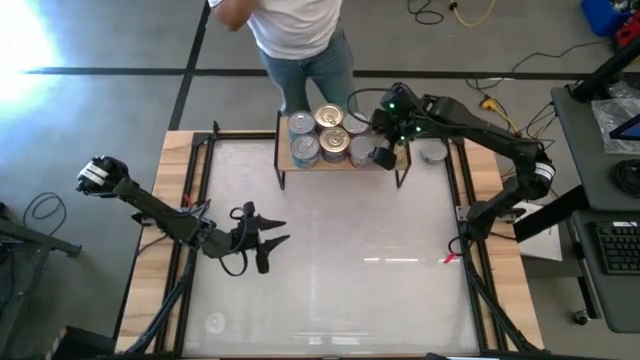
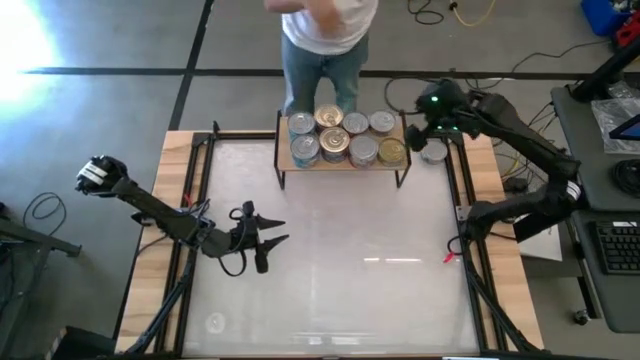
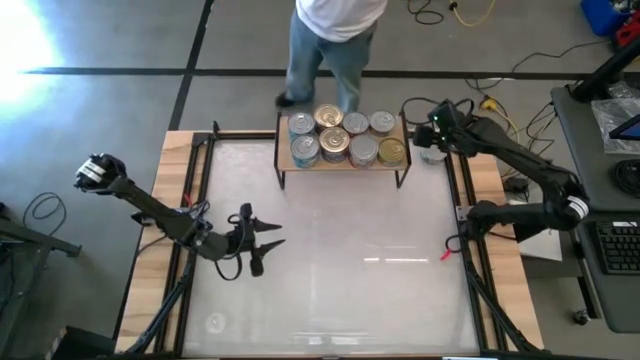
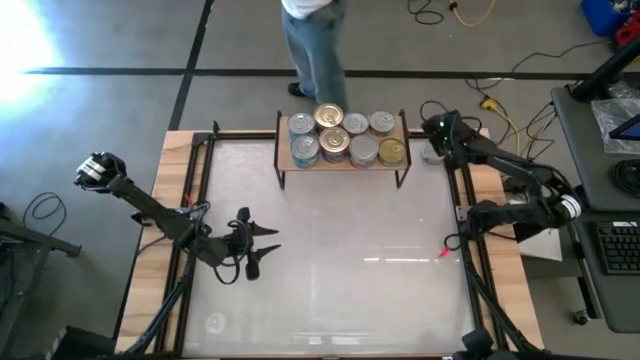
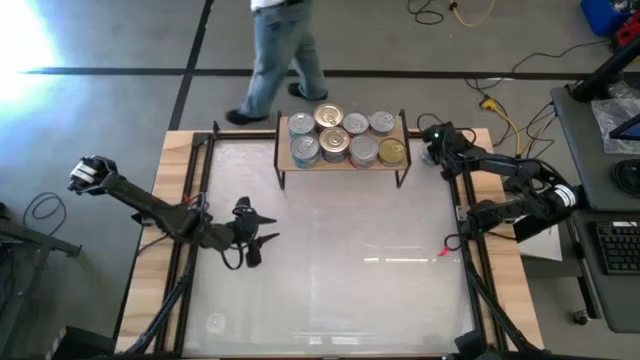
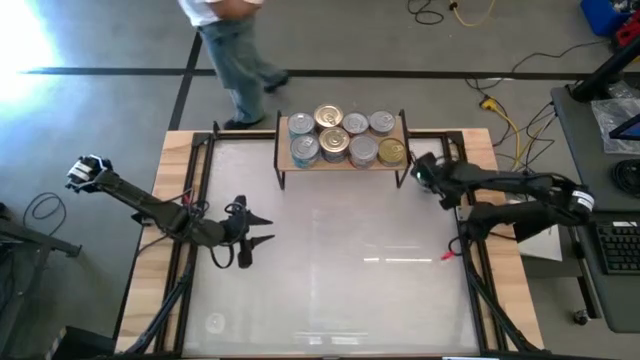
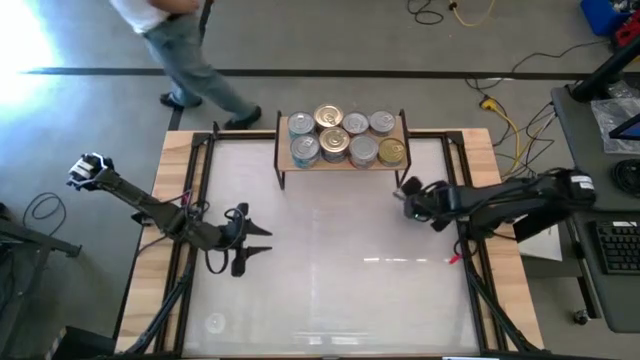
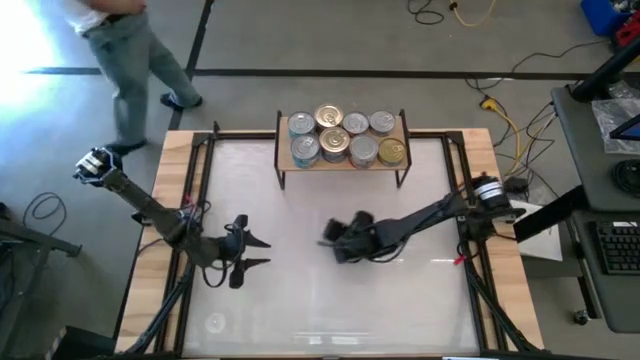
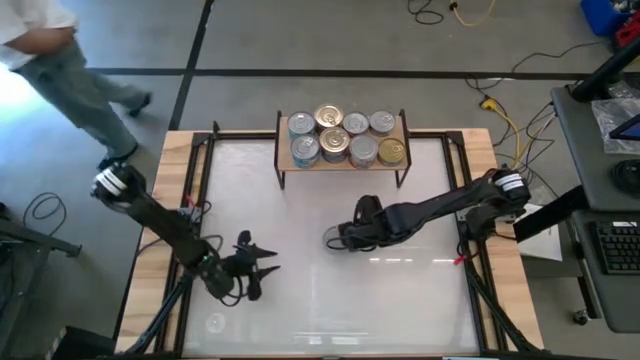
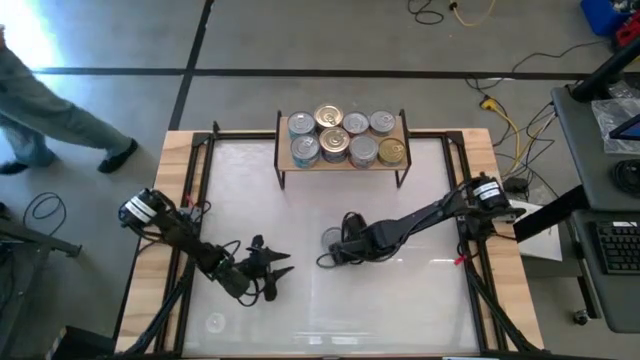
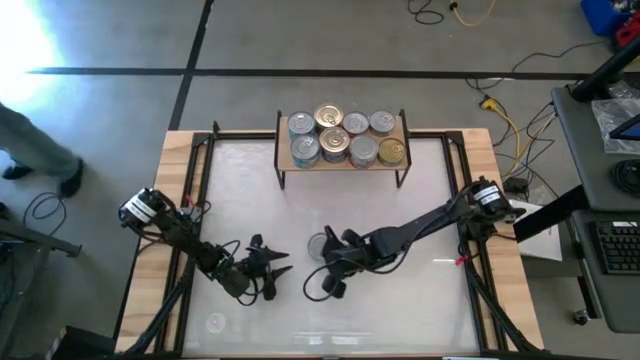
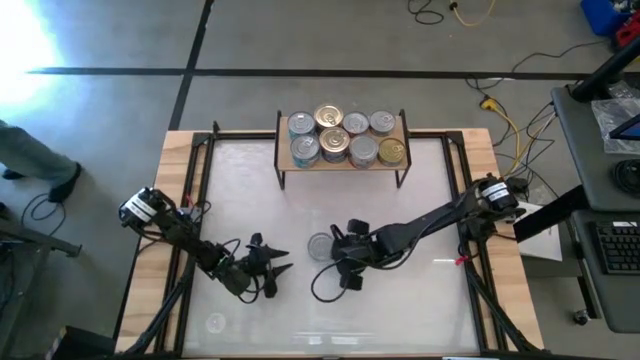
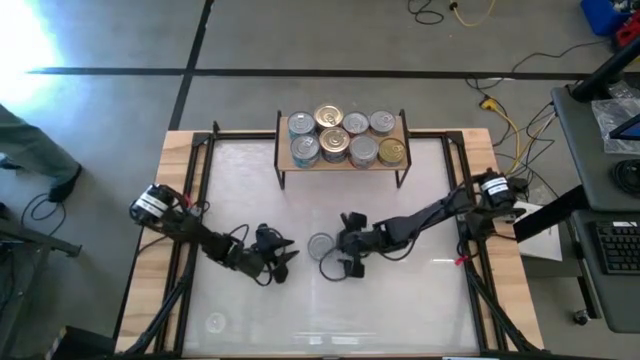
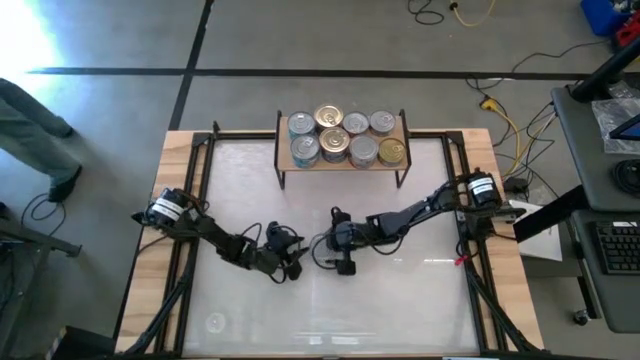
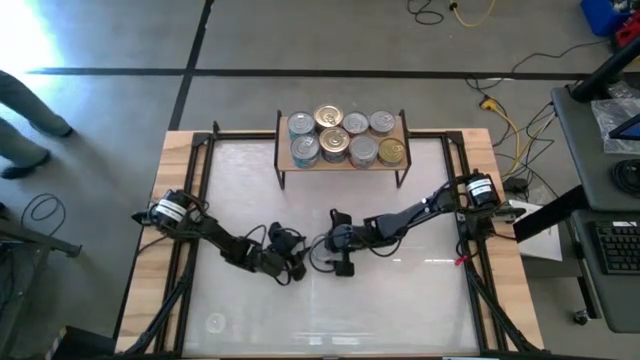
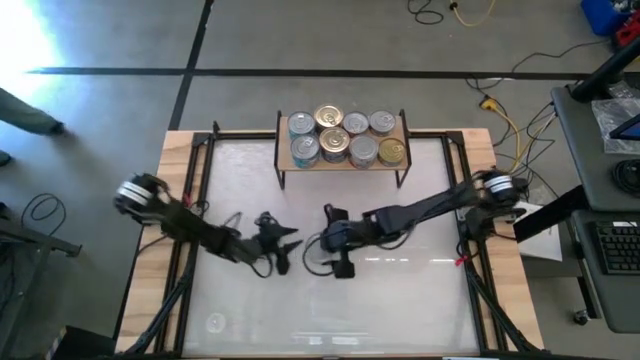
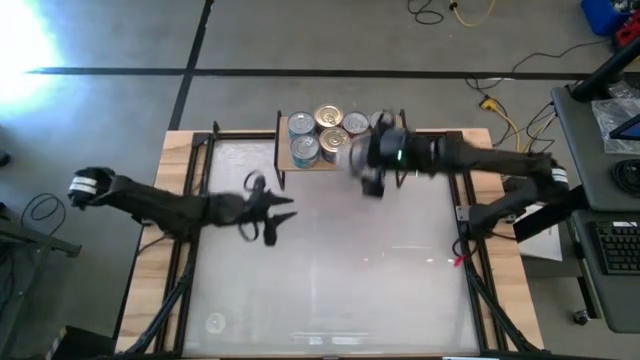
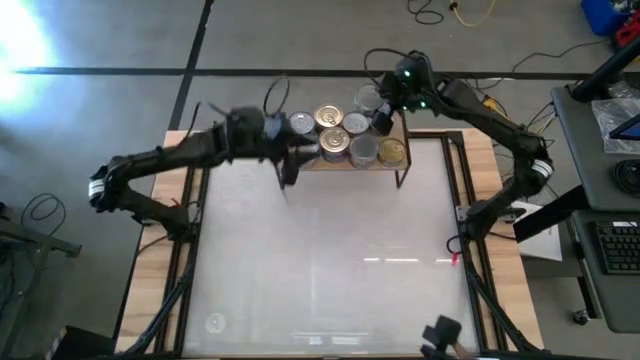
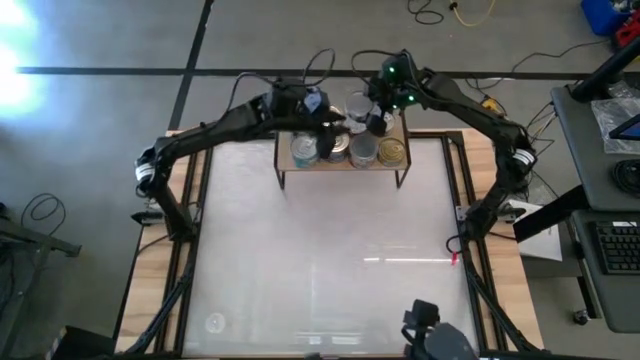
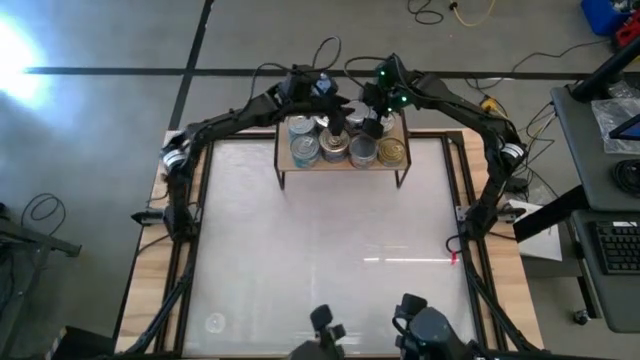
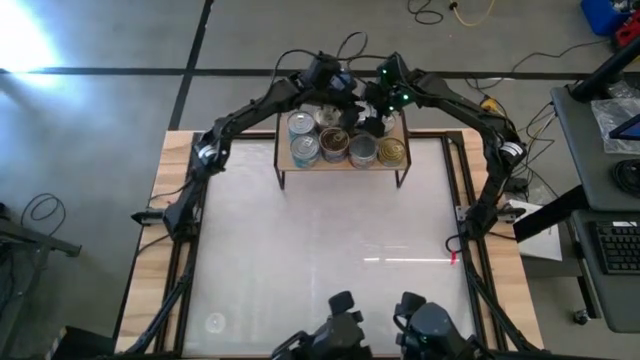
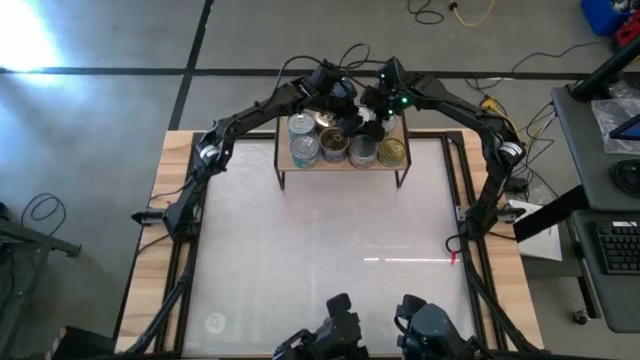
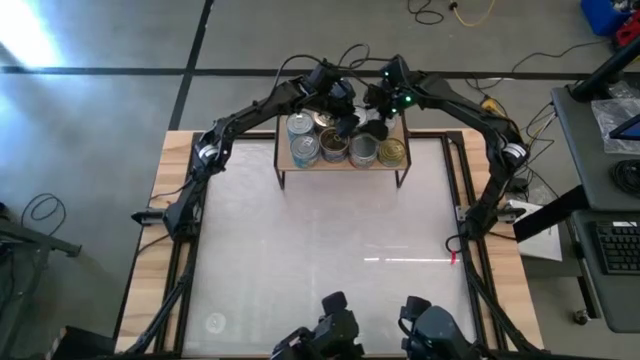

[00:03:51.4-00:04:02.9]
Task: Stack canned seafood by type on shelf
Stack the green tuna can on top of the red tuna can on the shelf

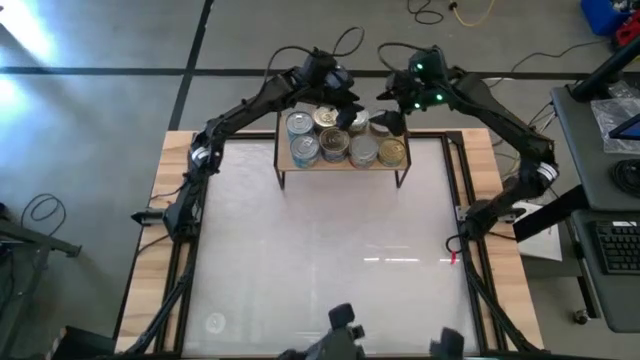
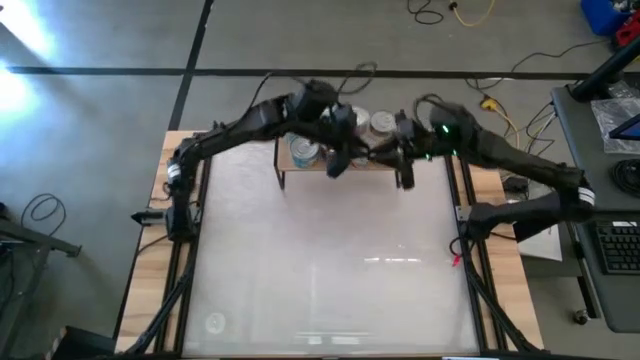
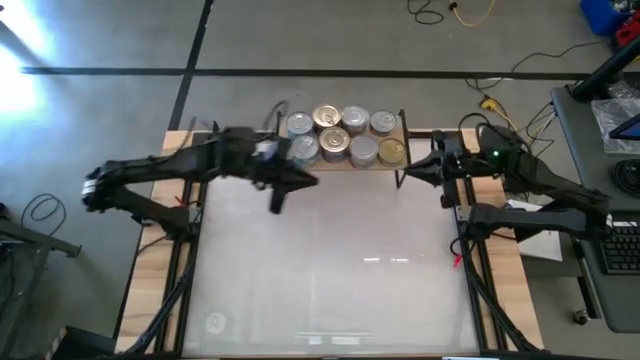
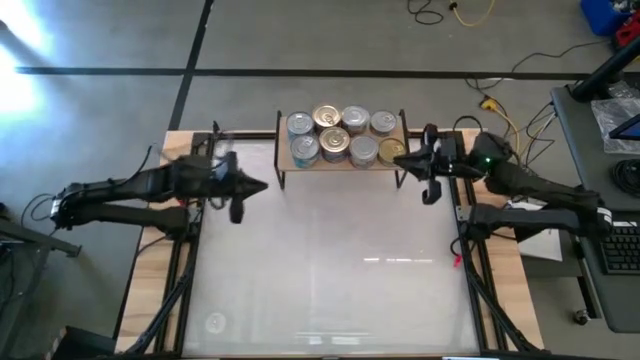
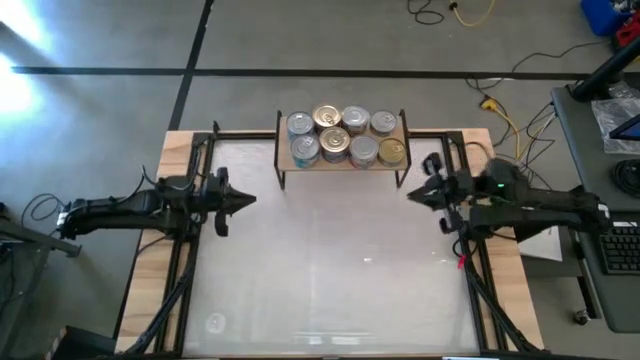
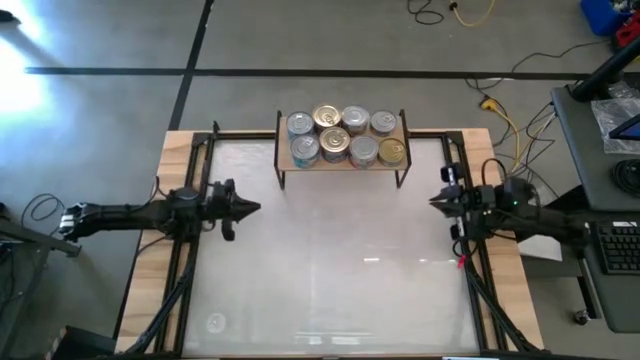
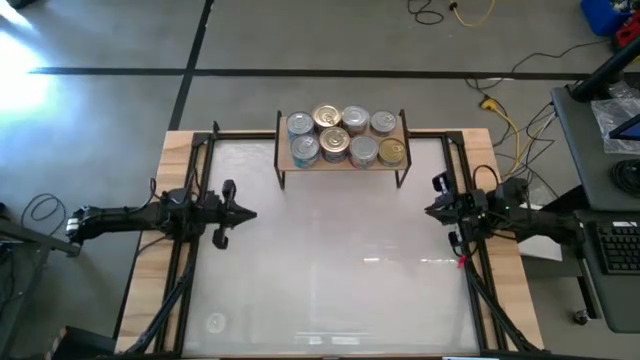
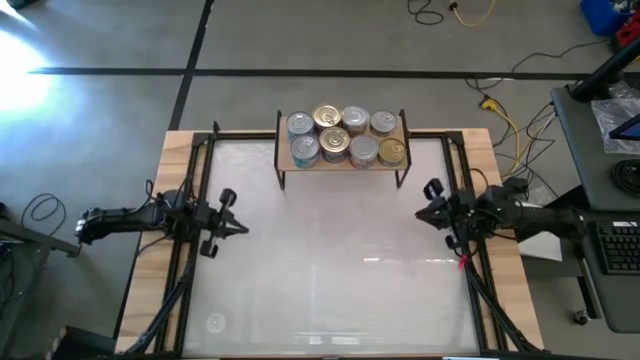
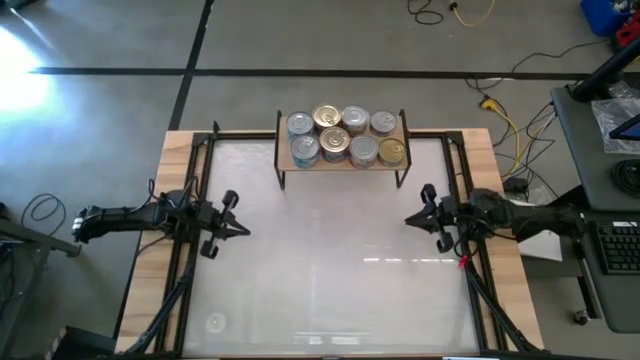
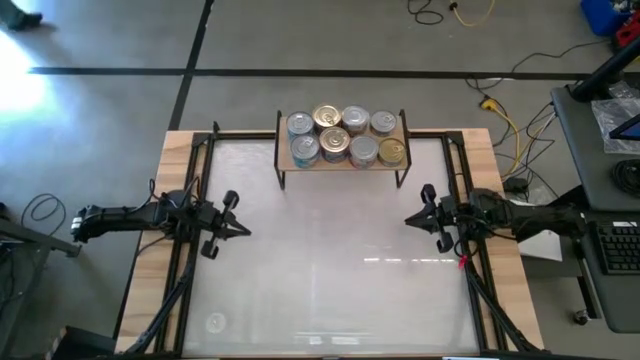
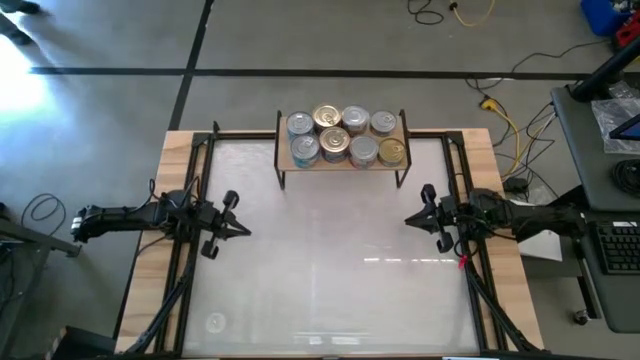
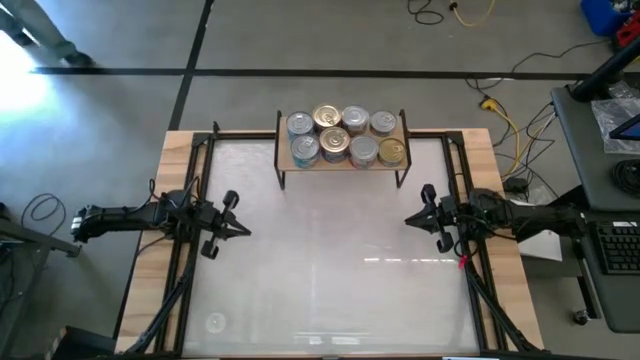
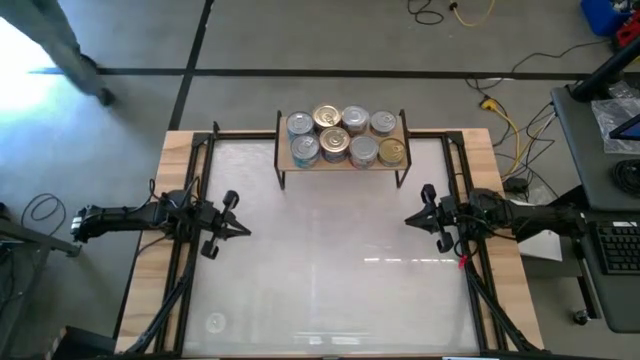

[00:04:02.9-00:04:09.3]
Return to Home Position

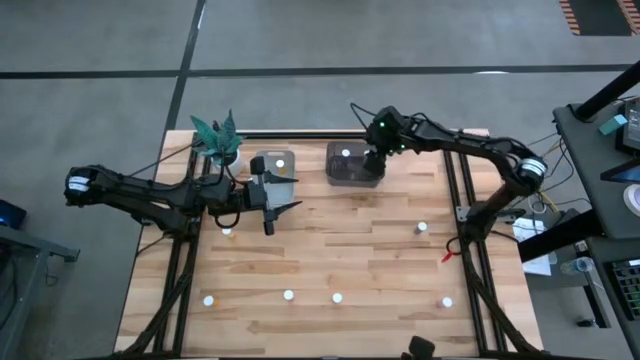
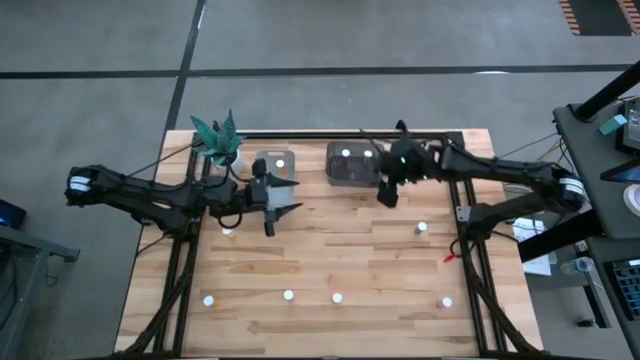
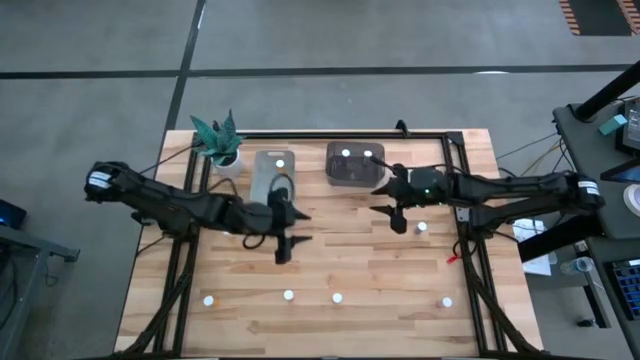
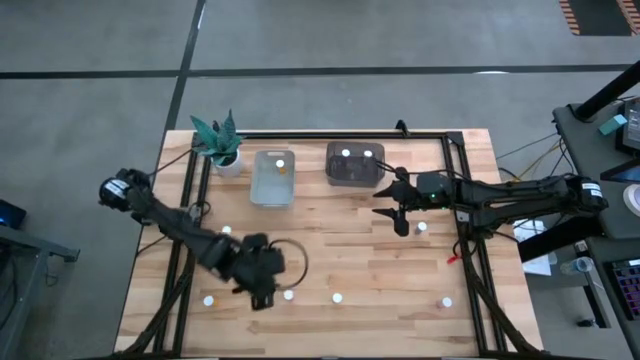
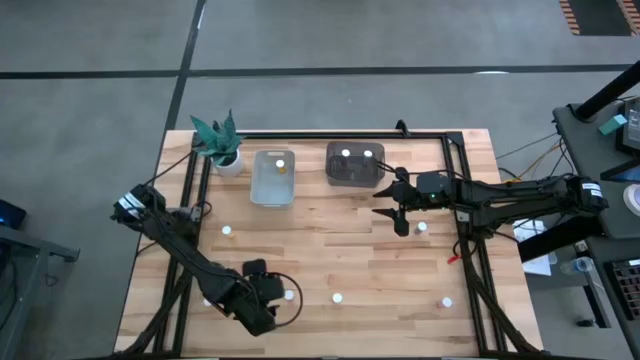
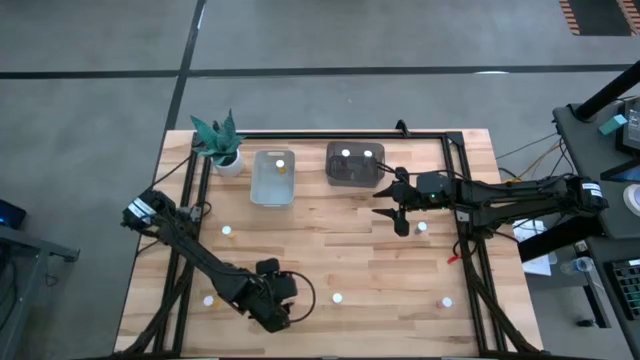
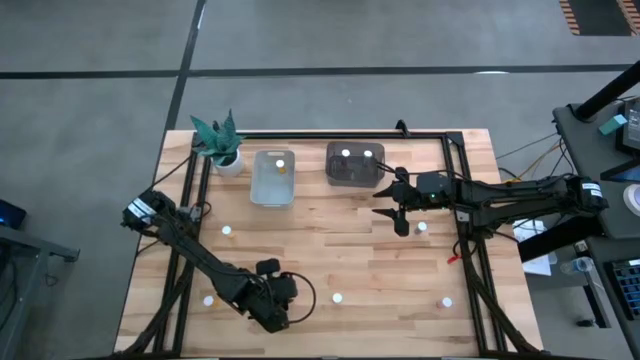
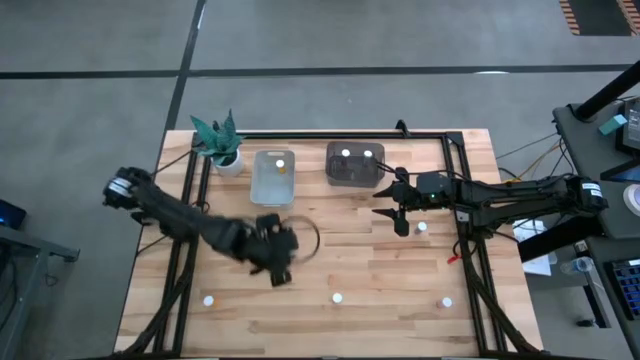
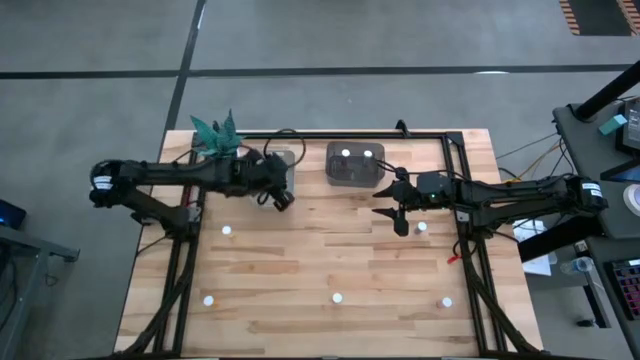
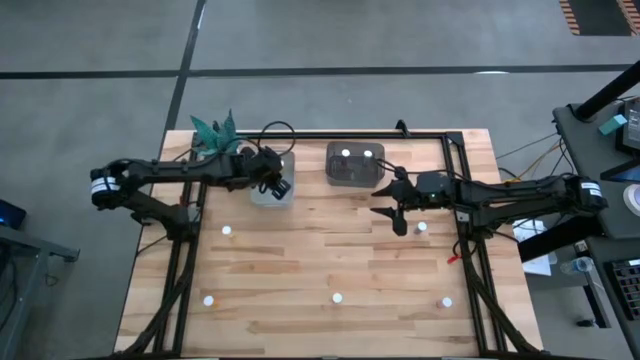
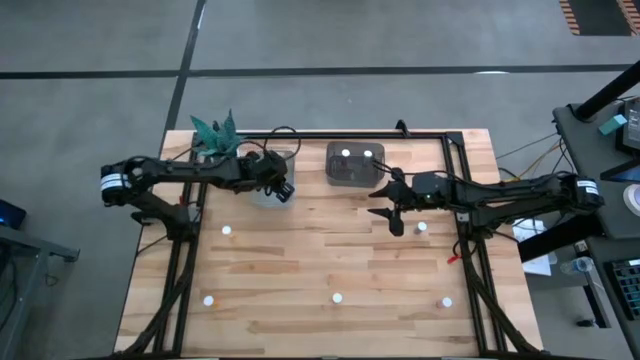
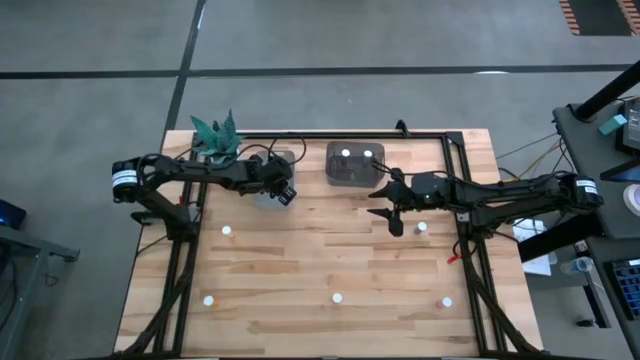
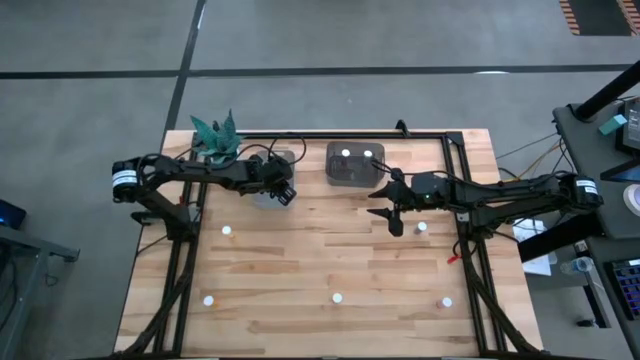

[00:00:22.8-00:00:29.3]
Task: Pick and place medicine bottles into bin by pill shape (circle, oval)
Put the left pink tablet bottle into the gray bin
